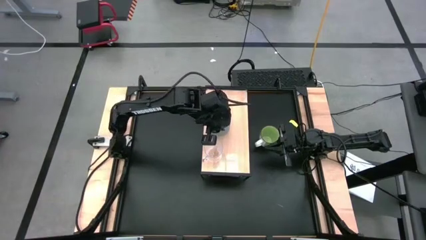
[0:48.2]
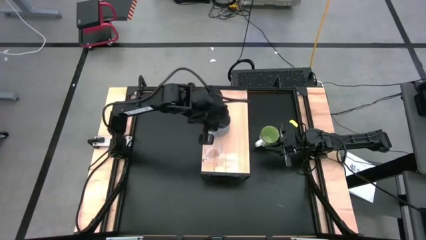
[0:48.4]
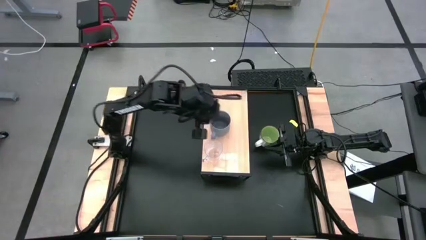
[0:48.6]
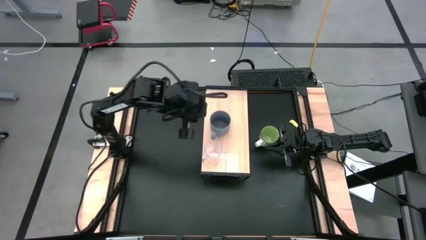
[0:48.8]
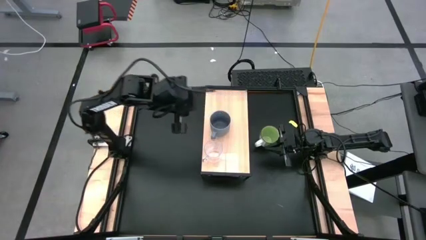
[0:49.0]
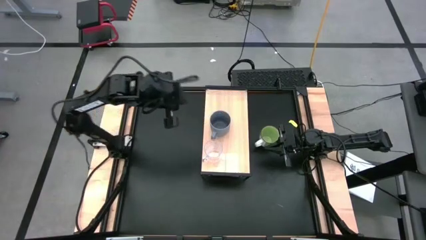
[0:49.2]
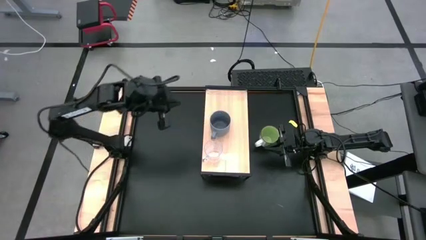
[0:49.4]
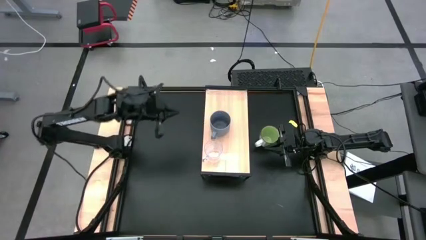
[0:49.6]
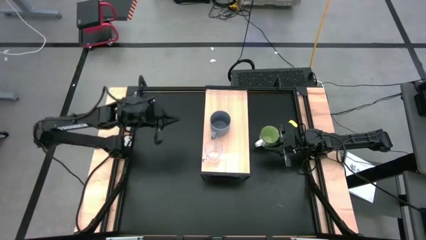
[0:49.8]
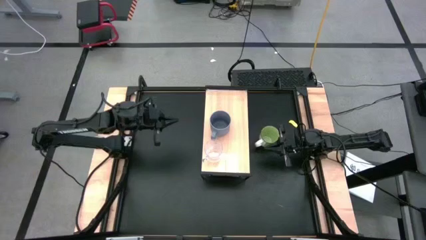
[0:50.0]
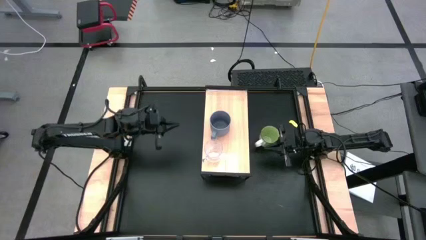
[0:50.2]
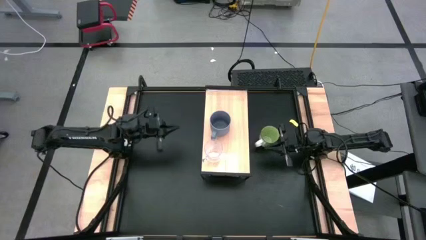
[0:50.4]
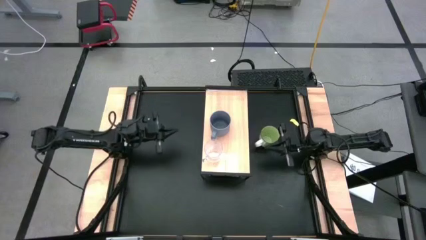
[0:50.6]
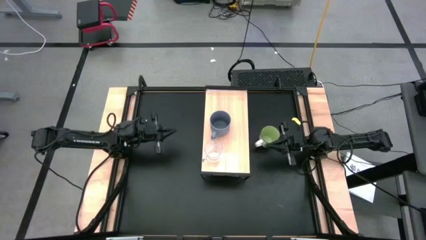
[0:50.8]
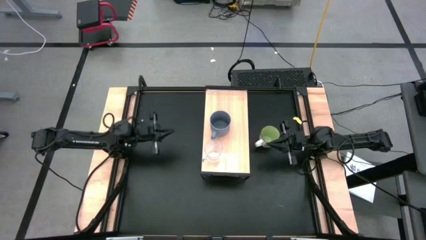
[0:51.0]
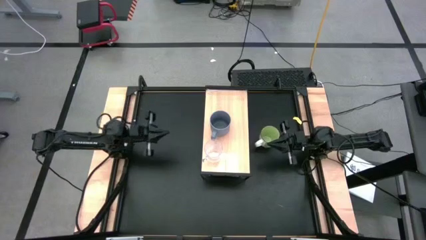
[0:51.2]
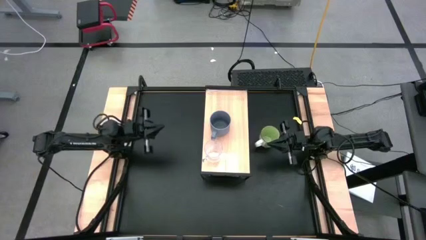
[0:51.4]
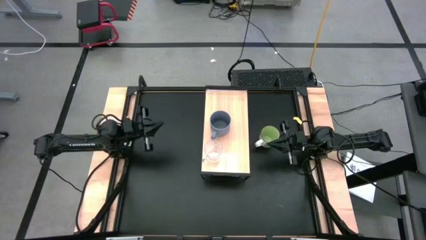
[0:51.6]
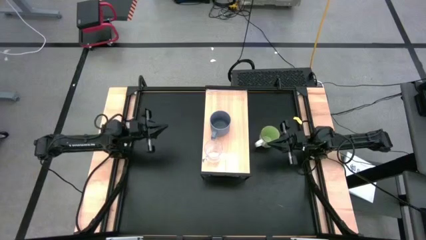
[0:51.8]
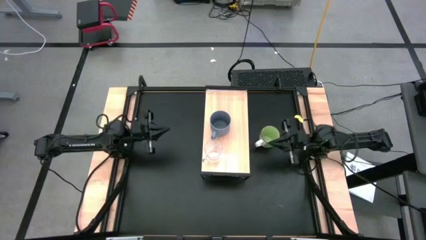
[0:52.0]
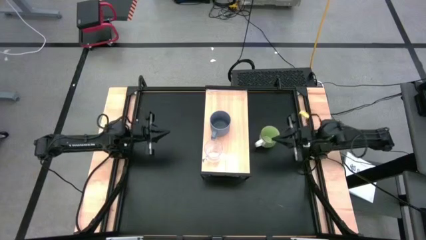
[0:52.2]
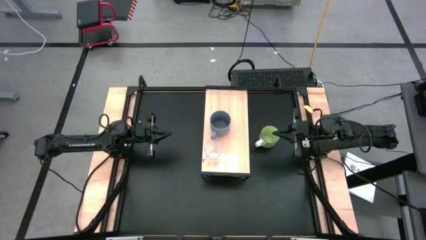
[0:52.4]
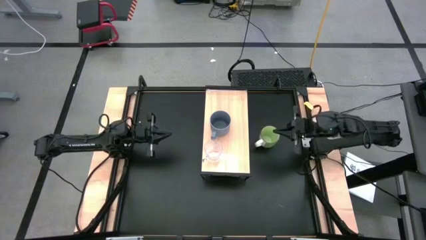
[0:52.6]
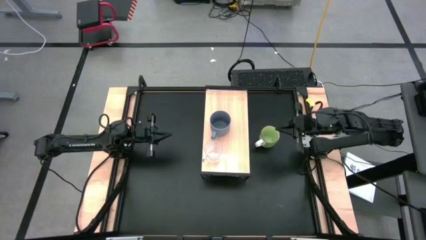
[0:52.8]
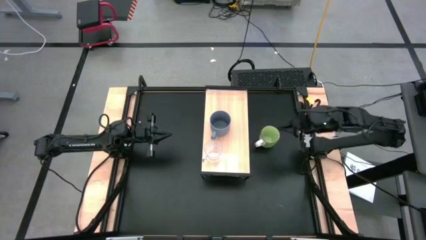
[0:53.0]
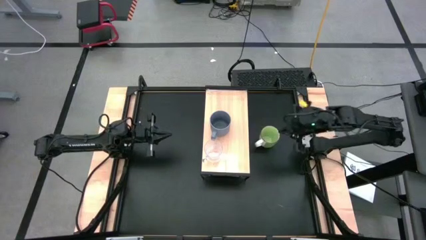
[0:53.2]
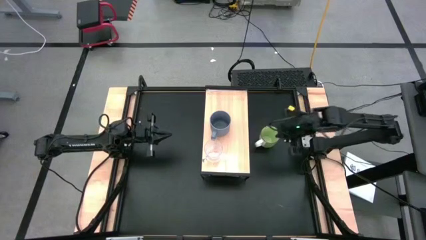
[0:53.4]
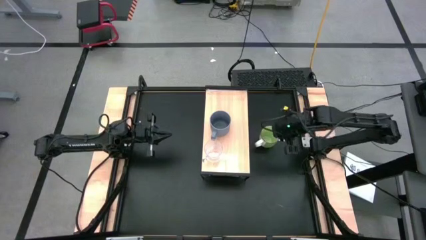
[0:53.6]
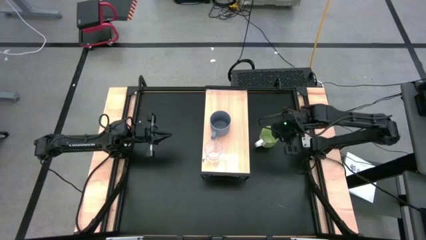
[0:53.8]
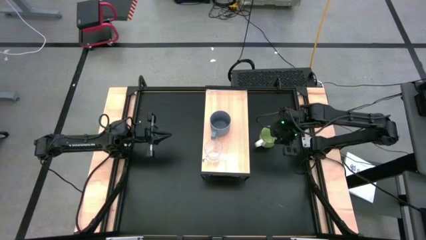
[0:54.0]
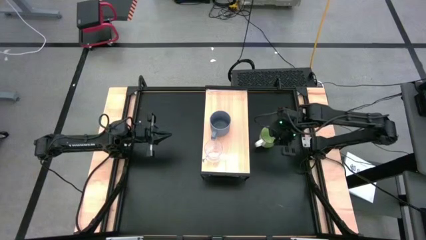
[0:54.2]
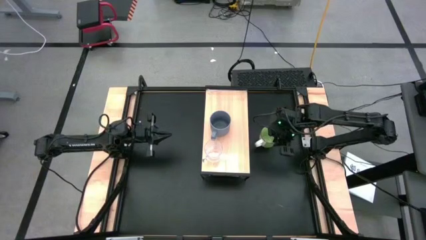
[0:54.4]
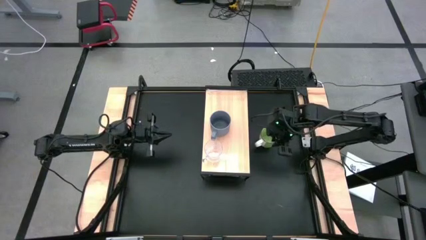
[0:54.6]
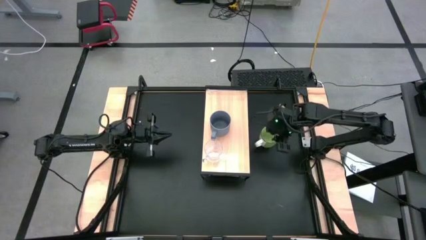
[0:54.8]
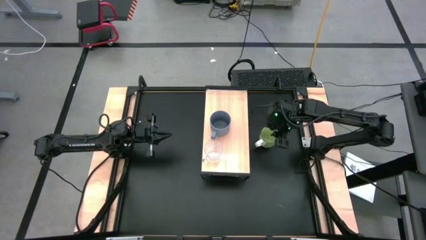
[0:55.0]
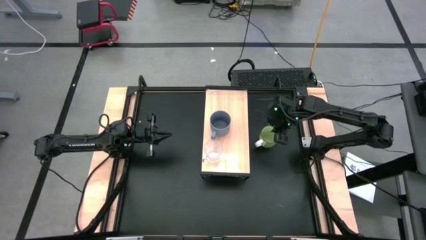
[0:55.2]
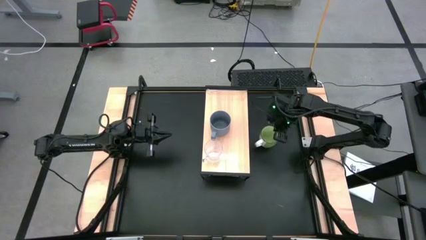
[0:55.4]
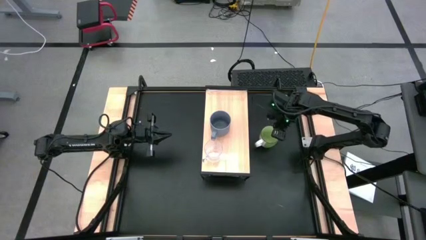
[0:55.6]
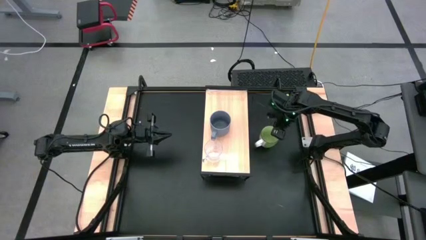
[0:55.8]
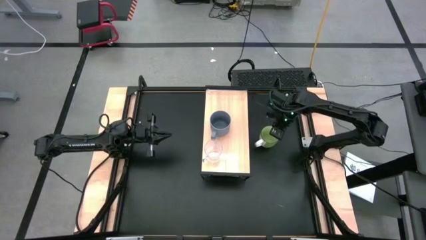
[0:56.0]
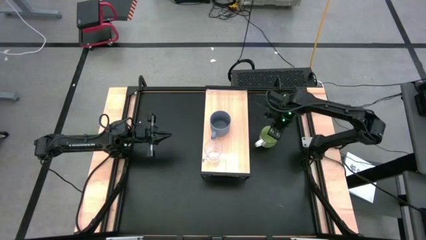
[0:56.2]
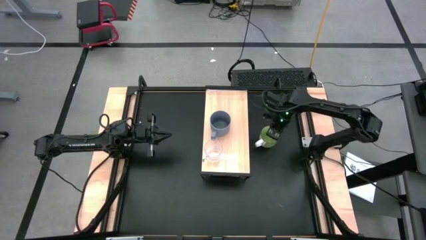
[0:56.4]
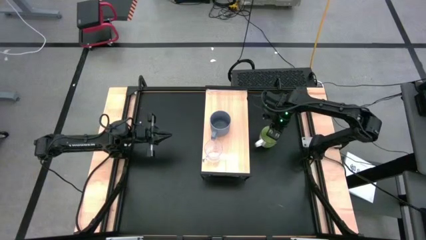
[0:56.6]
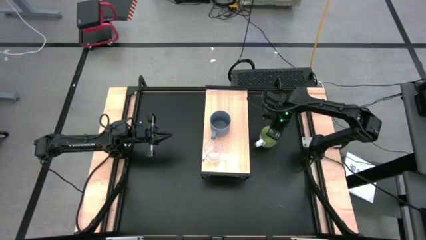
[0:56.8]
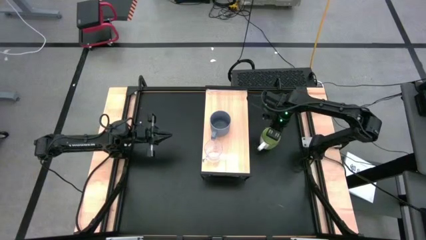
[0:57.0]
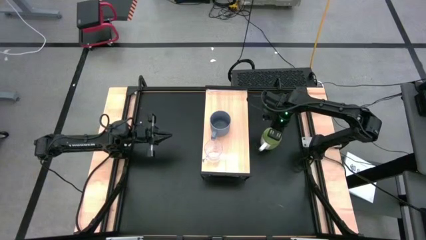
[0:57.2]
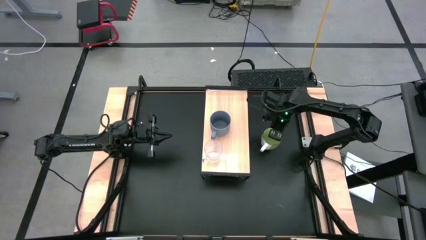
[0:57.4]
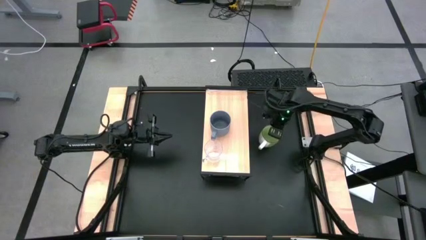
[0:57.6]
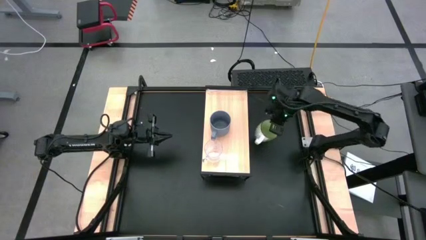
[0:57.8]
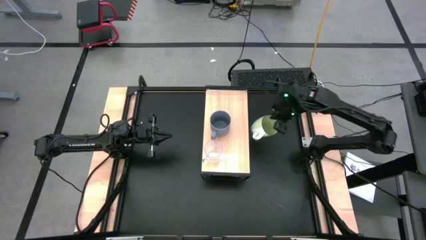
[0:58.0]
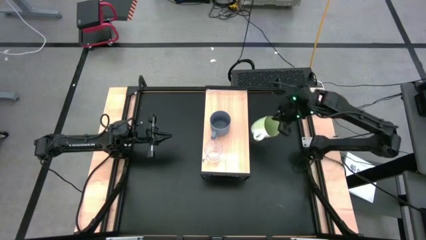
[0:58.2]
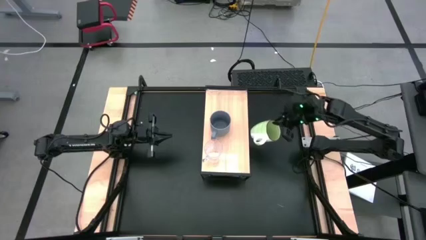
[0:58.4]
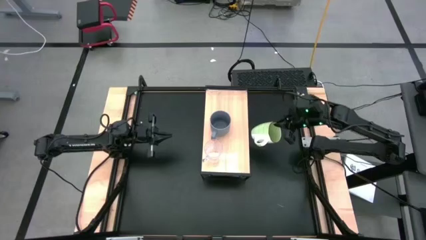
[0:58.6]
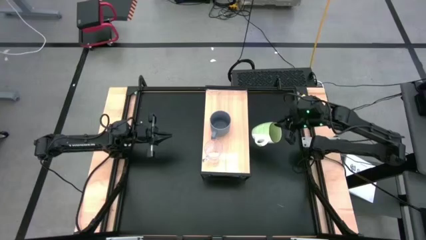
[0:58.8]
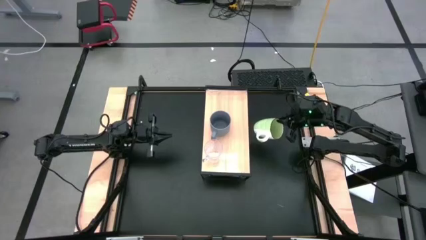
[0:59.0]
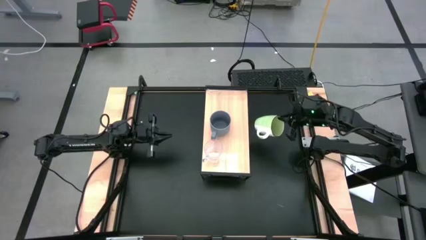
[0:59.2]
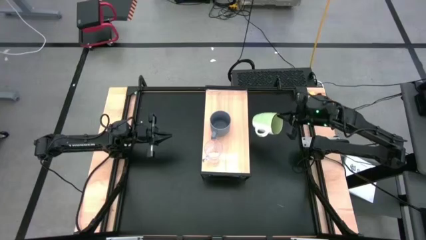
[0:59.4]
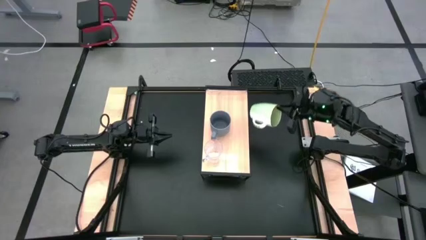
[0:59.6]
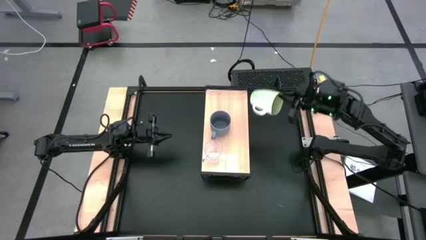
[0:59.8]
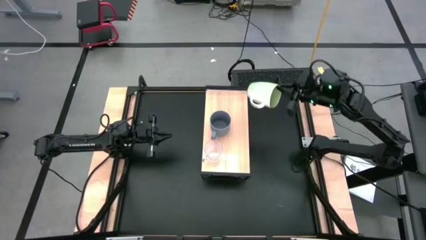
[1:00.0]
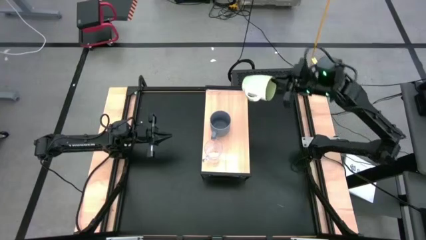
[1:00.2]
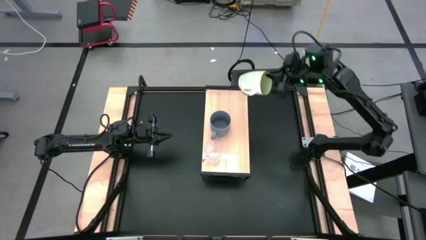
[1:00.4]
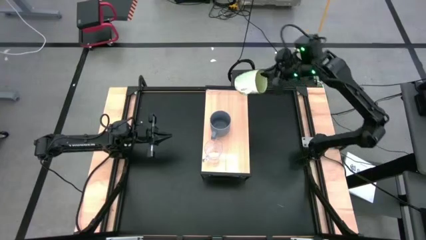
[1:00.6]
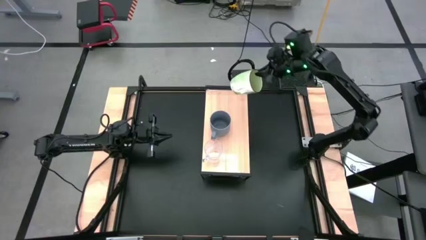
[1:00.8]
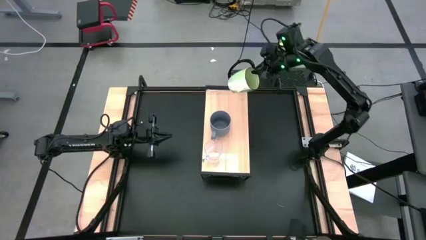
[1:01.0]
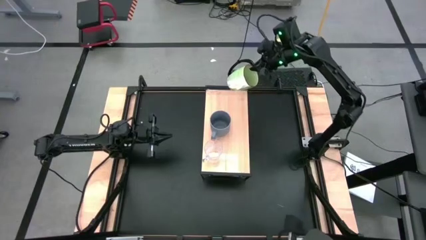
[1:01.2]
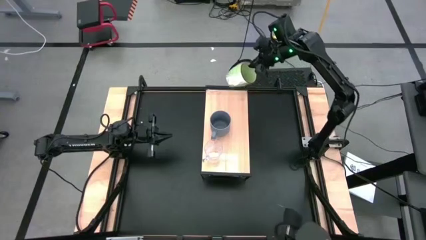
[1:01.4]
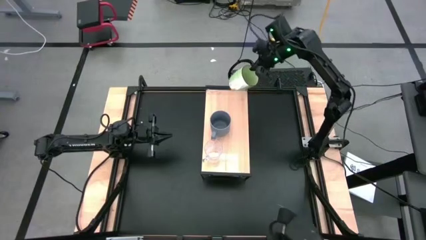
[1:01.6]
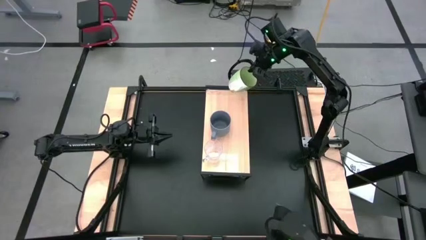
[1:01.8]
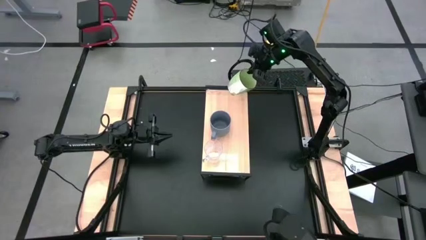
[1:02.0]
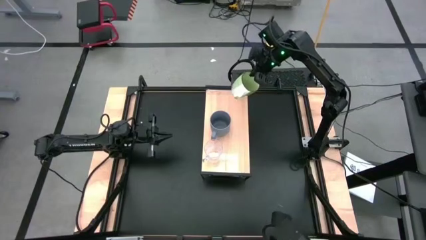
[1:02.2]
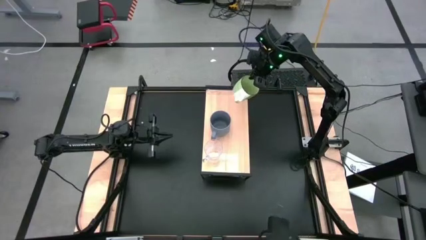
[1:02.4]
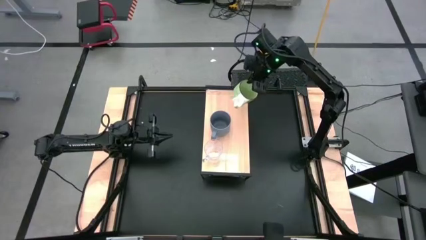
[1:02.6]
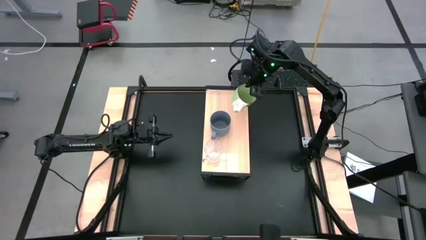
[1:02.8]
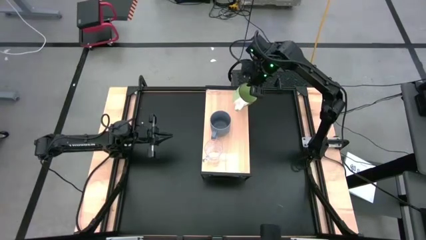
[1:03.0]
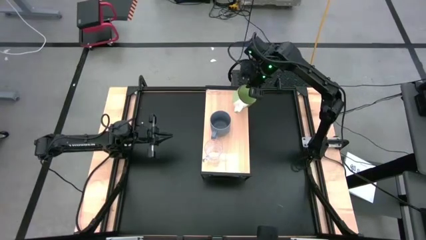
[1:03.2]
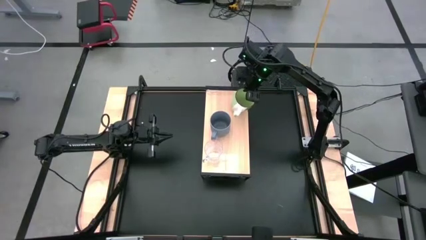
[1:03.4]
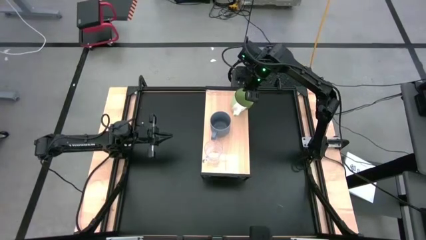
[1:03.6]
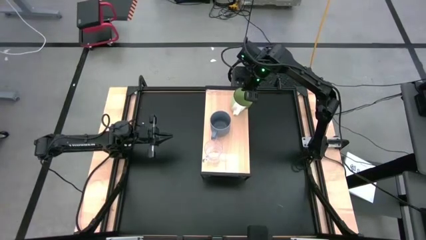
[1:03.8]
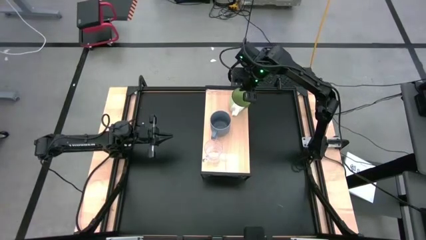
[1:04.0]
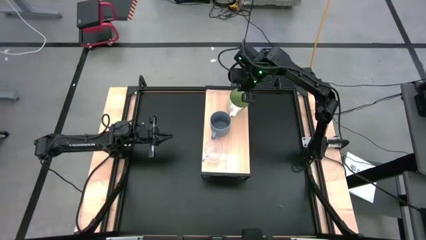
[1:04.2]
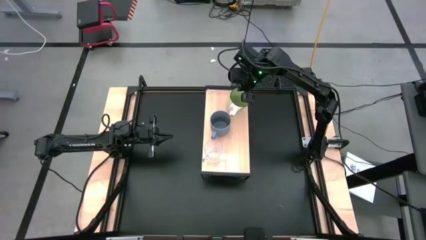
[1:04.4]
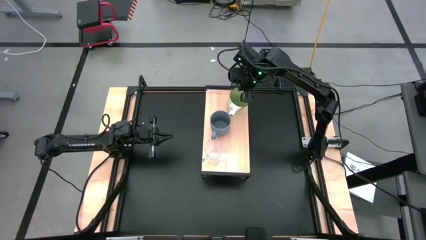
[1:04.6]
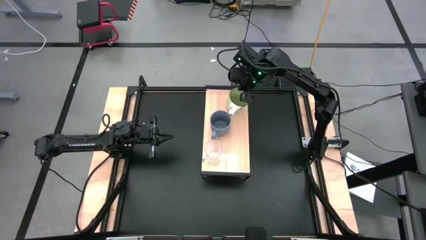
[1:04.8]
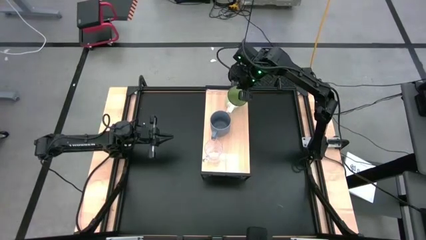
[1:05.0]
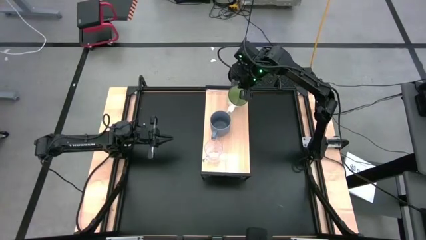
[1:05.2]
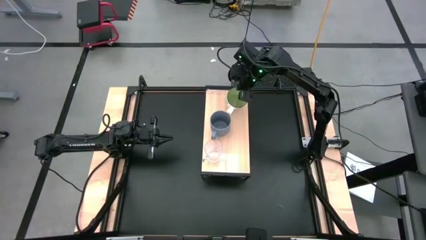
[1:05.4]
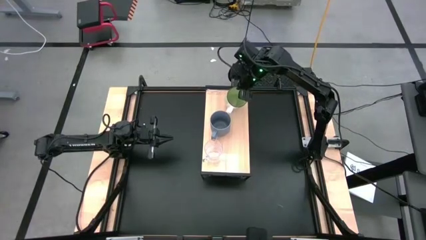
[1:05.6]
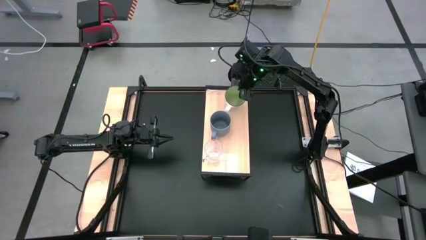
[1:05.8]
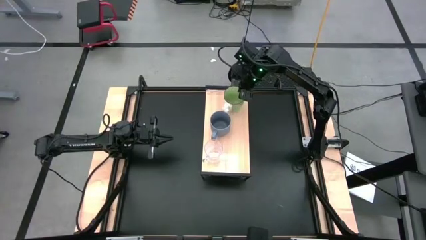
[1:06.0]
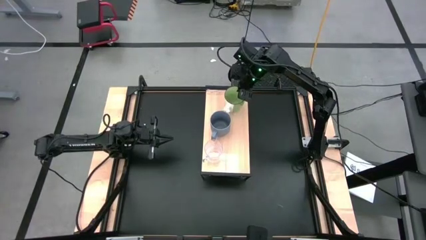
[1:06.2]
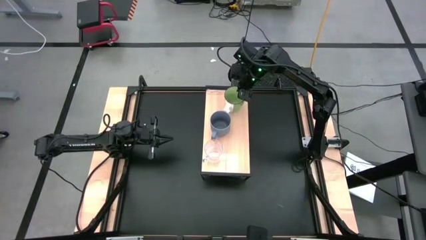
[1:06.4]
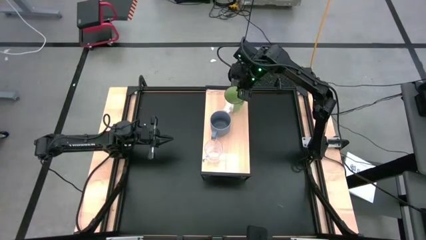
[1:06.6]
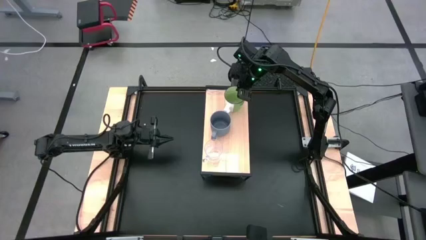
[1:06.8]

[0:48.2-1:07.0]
Task: Stack small to large cups/mugs on shelf
Put the green mug on the shelf
